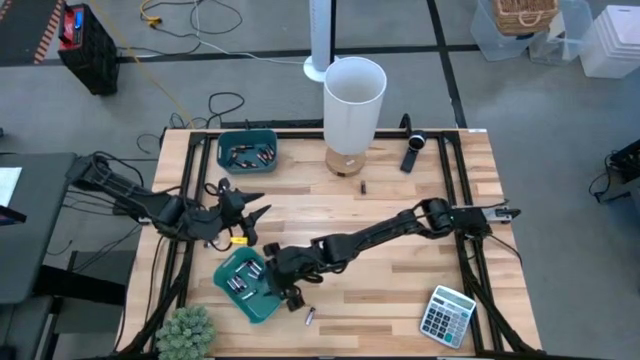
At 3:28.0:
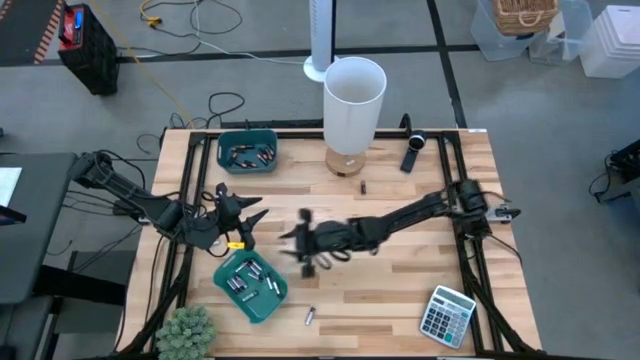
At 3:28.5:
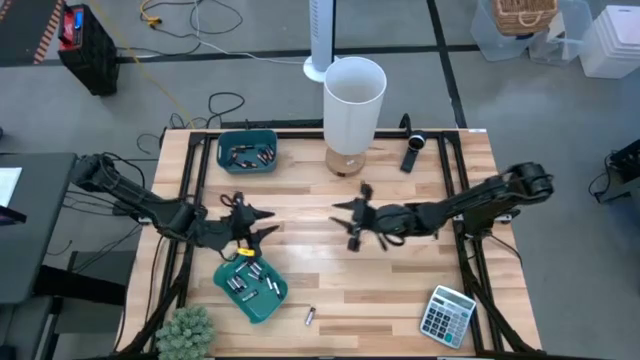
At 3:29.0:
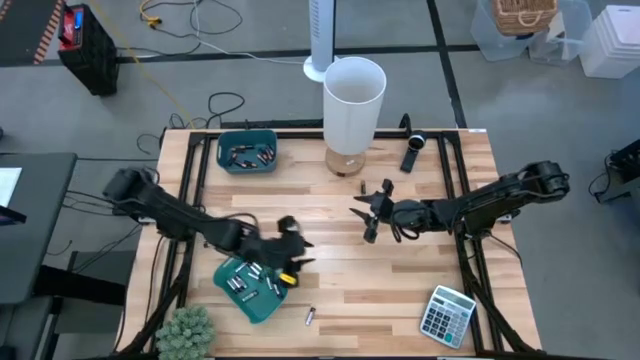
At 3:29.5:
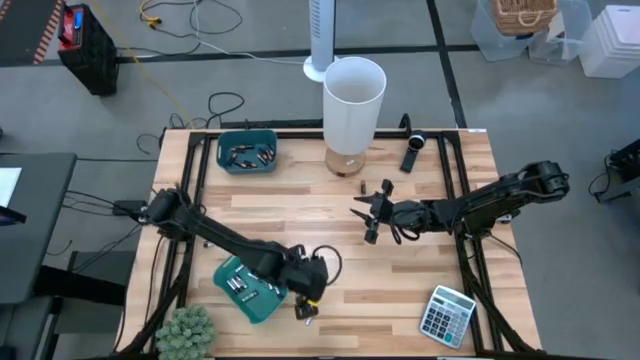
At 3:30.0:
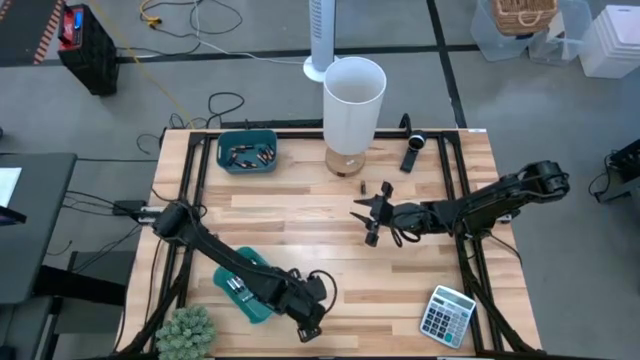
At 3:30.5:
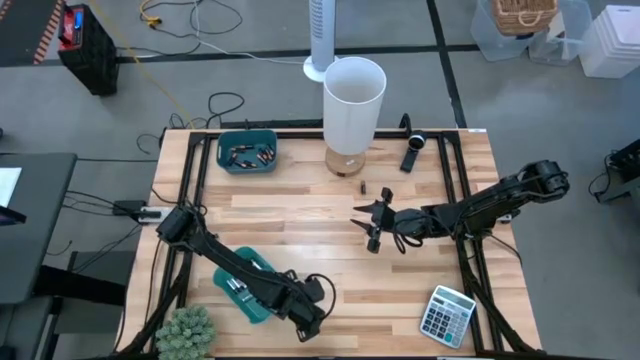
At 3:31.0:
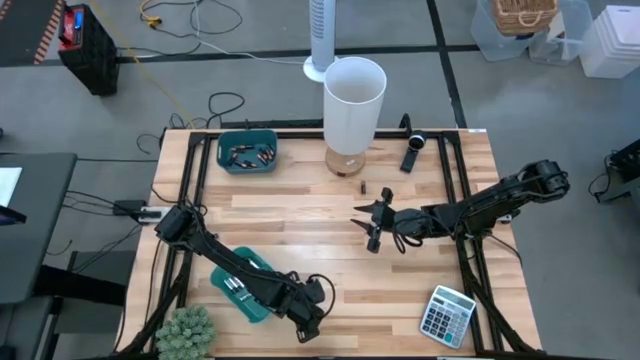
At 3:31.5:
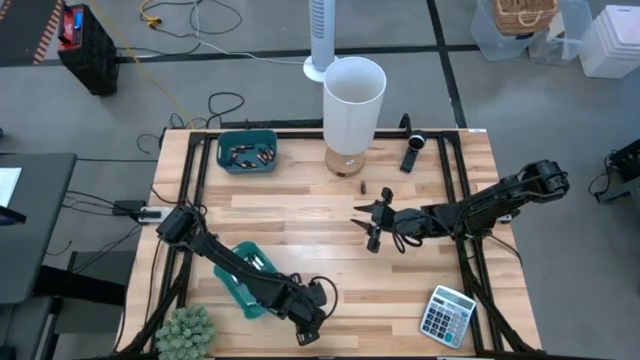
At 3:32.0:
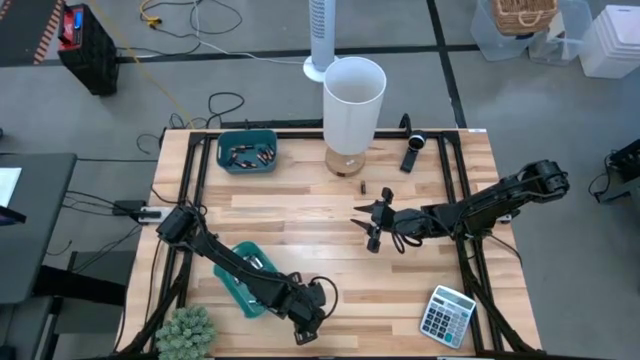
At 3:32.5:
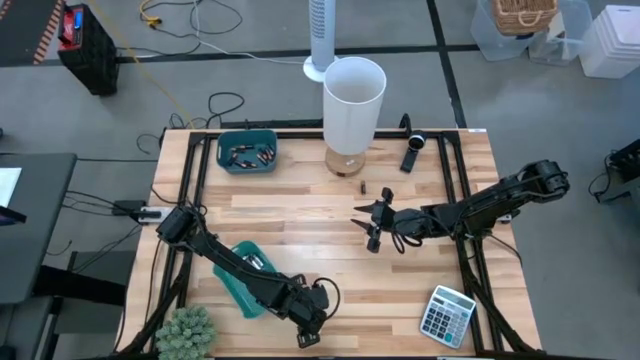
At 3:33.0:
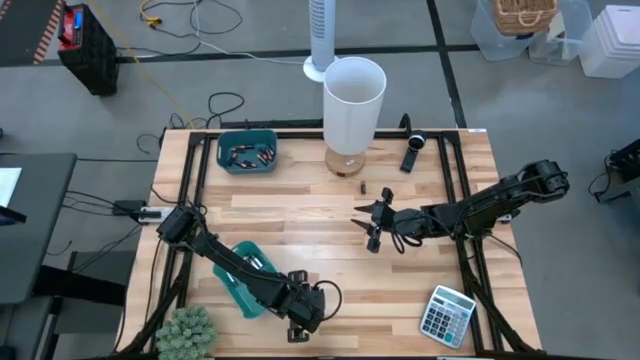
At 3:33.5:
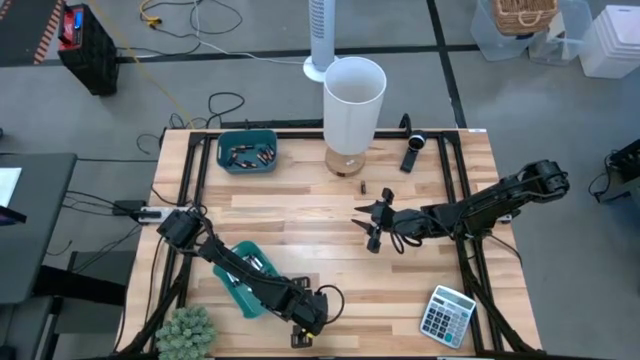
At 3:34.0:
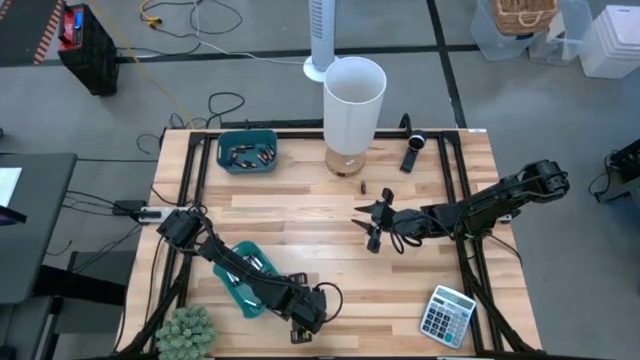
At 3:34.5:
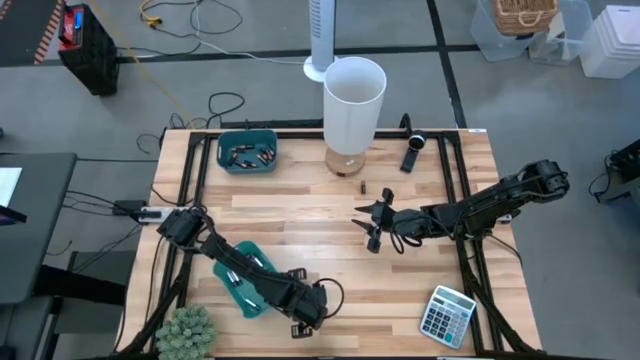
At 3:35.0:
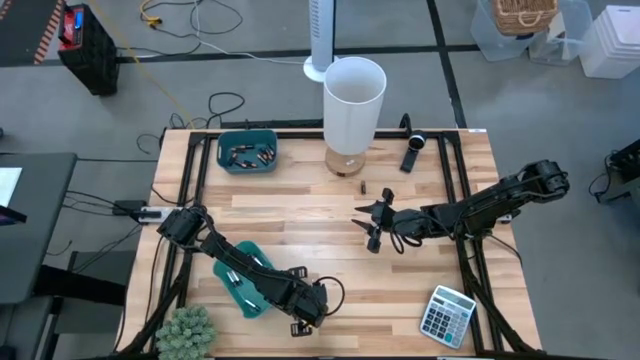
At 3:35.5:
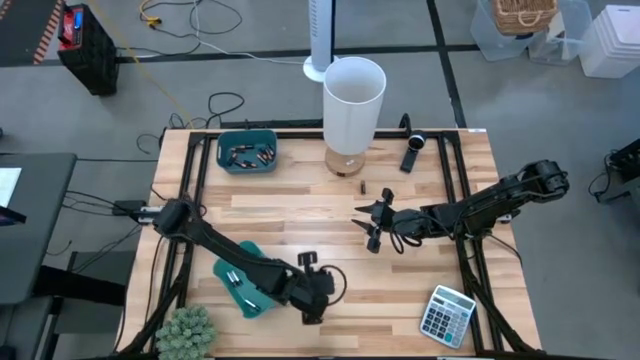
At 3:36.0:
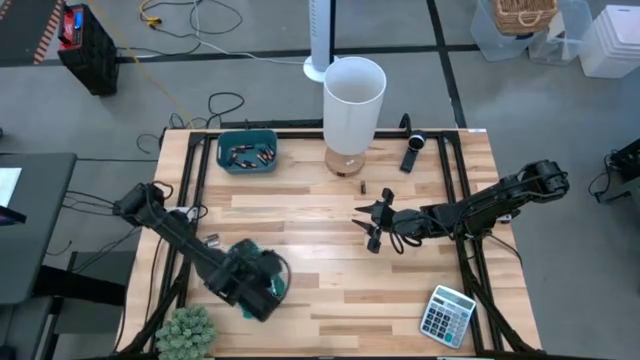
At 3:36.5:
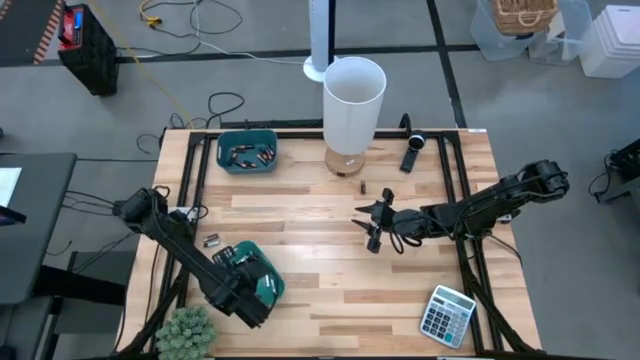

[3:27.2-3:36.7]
Task: Sort batteries
Put the silver battery into the green bin

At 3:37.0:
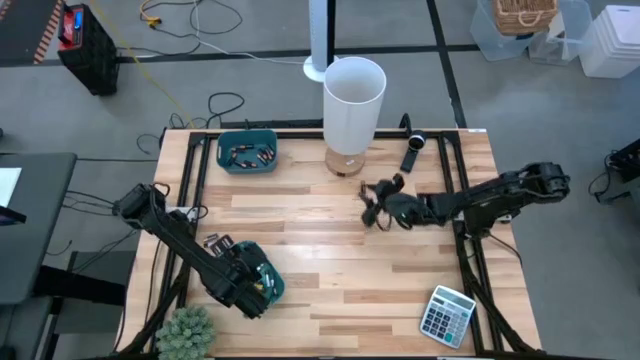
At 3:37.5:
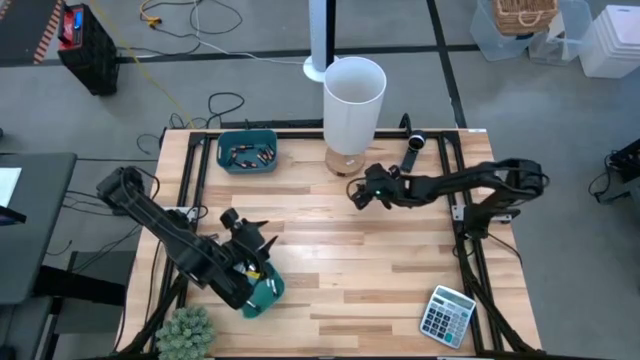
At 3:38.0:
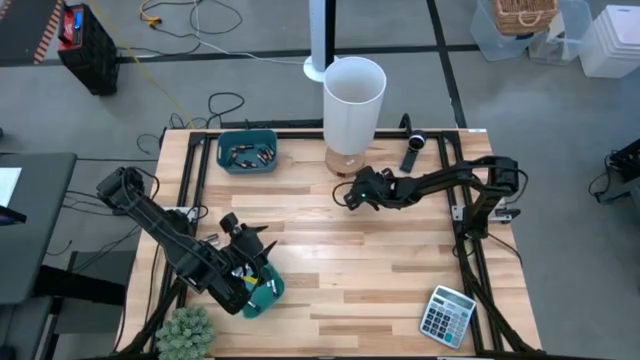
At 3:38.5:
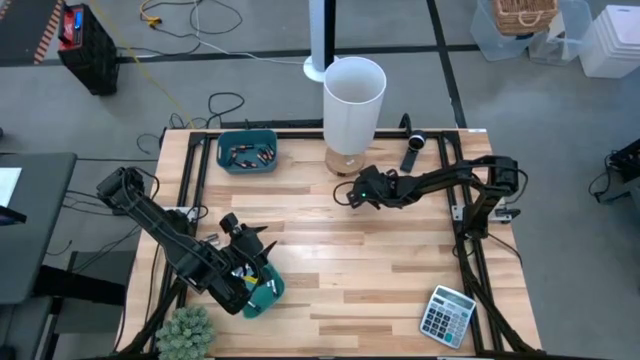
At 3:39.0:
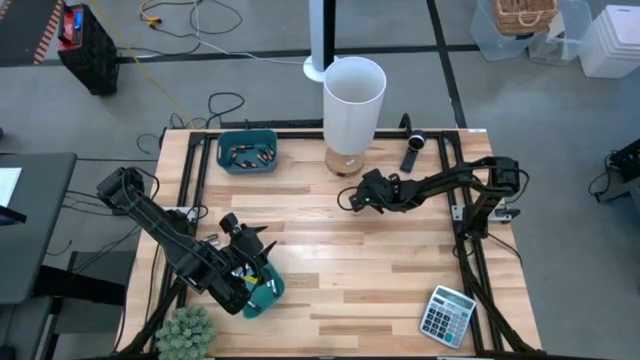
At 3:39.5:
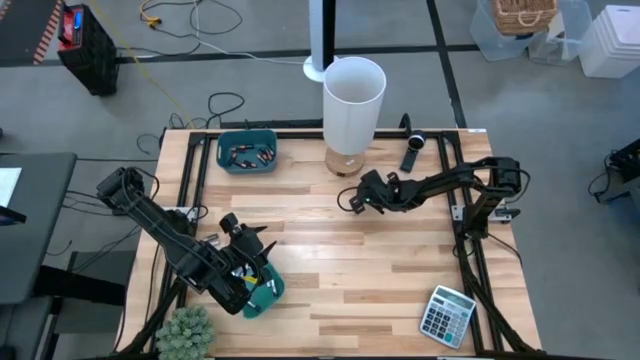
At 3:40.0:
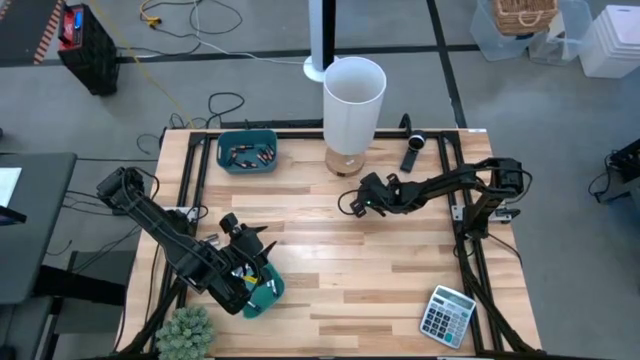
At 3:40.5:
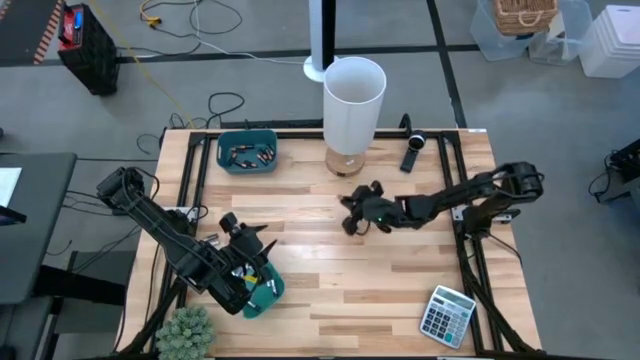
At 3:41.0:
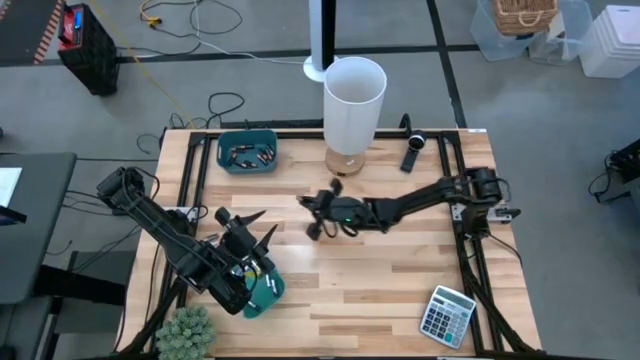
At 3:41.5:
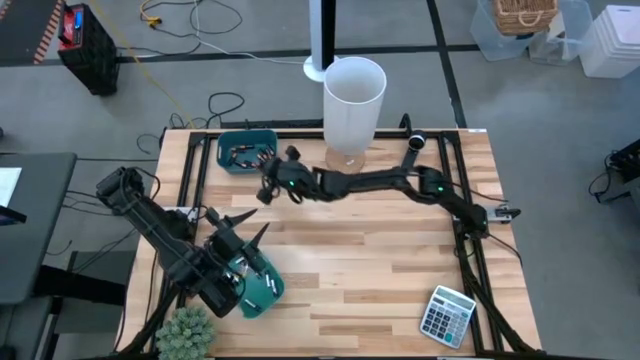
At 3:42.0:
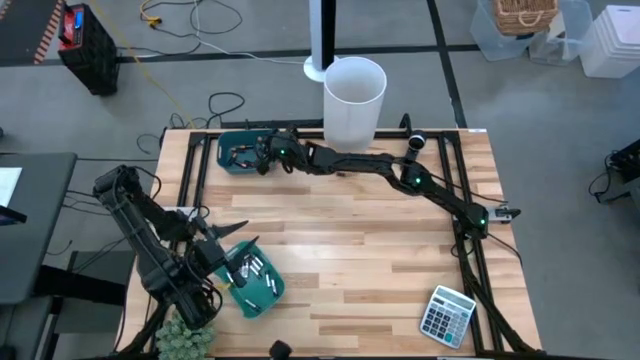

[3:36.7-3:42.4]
Put the black battery into the blue bin

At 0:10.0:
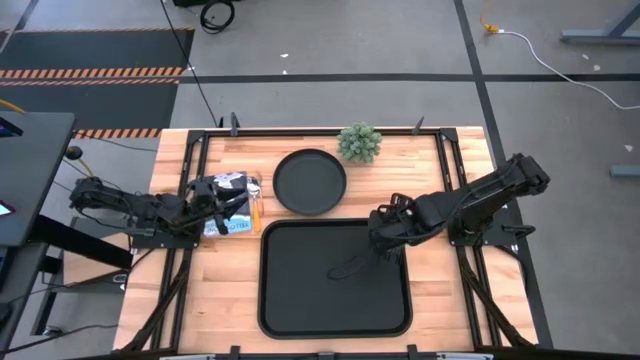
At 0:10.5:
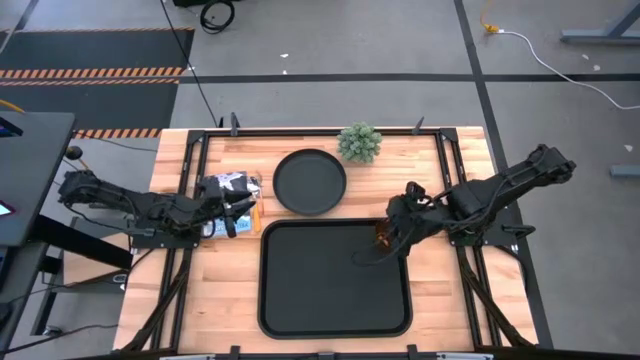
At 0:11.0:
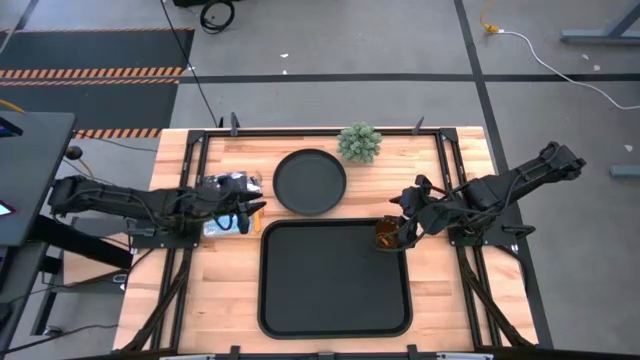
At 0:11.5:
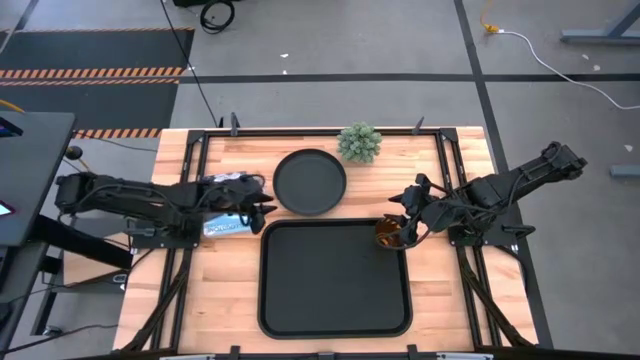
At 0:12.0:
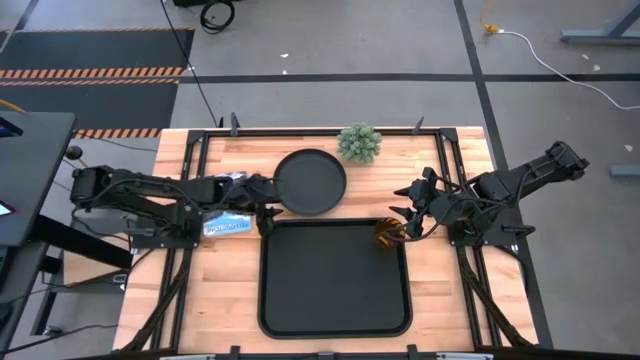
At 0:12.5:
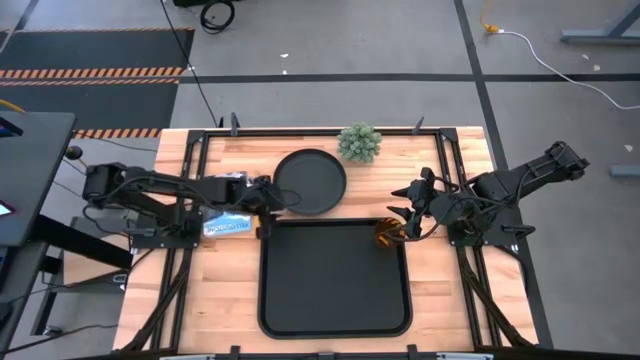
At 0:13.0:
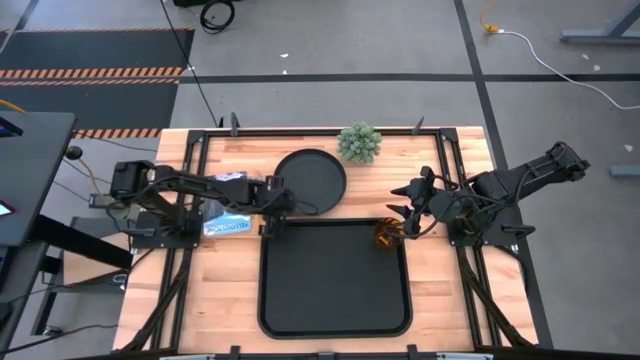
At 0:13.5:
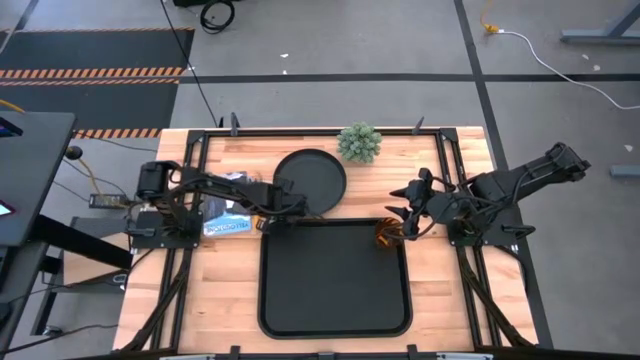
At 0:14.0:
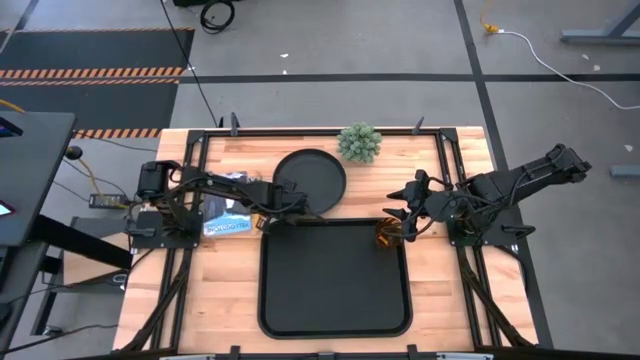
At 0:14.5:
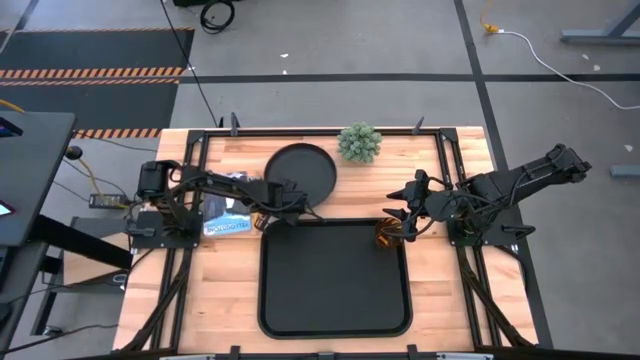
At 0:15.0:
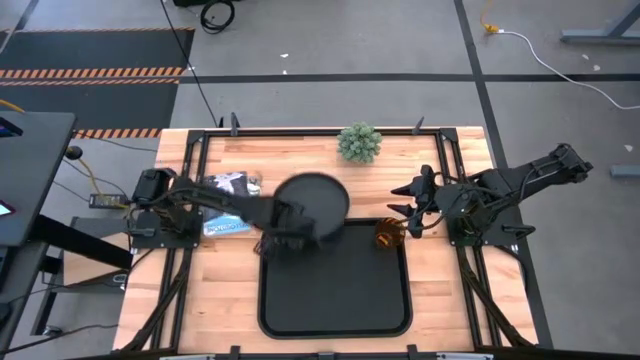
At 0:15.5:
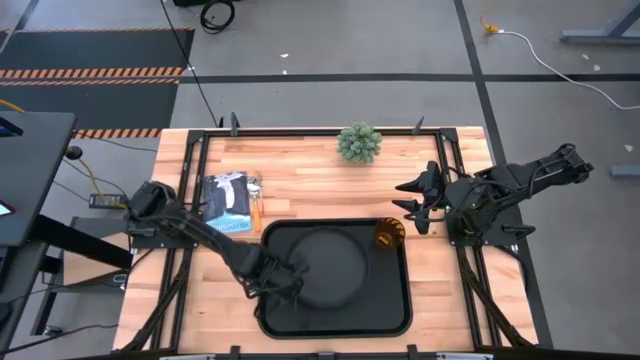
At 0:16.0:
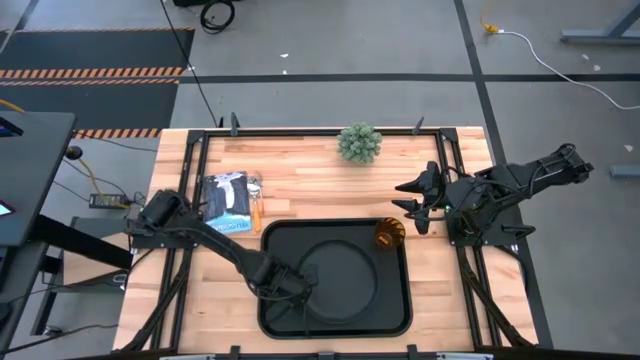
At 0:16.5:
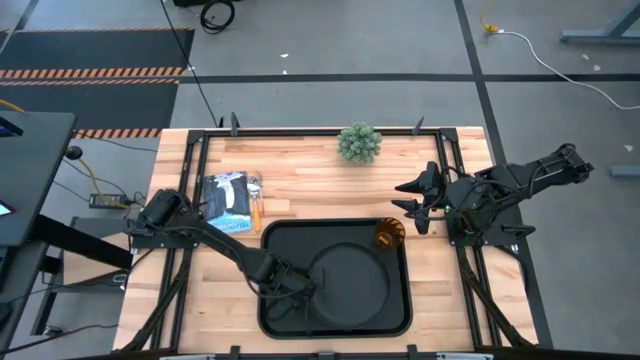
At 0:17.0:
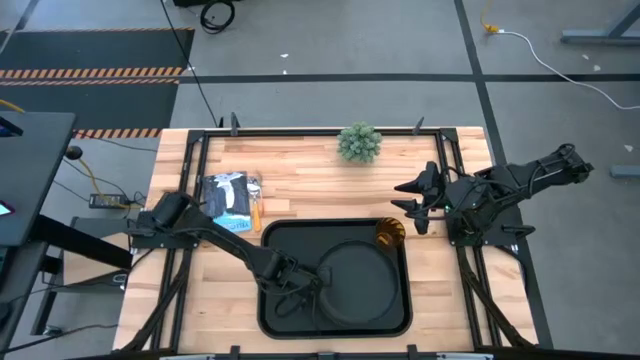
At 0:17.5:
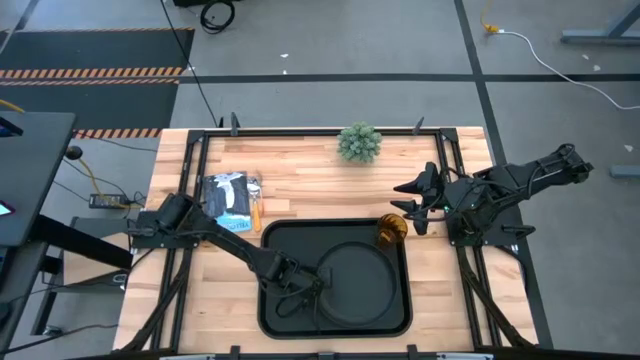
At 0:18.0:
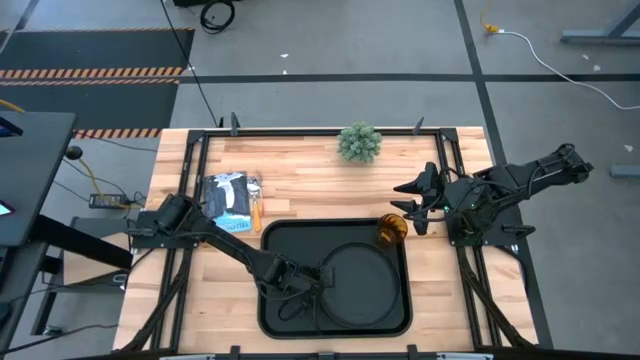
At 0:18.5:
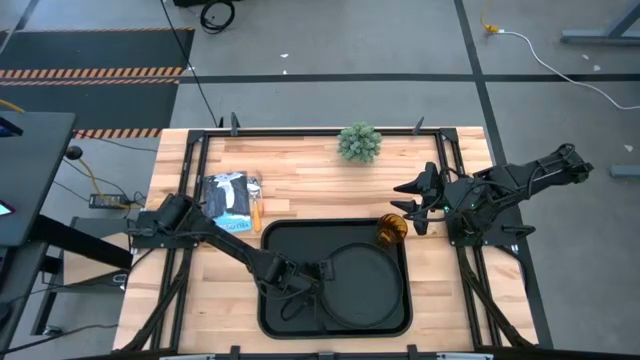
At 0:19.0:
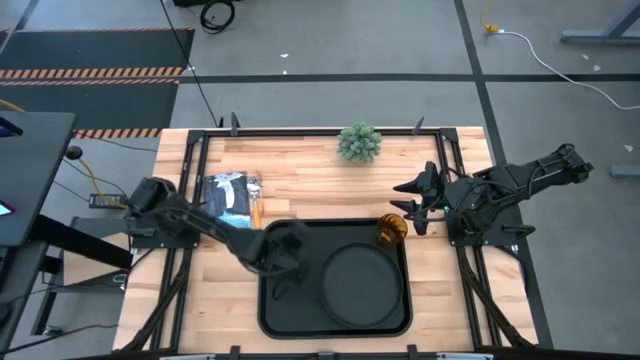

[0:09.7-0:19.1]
Task: Pick and place plate/cup/fork/spoon on tray
Put the black plate on the black serving tray to the bottom left of the orange glass
